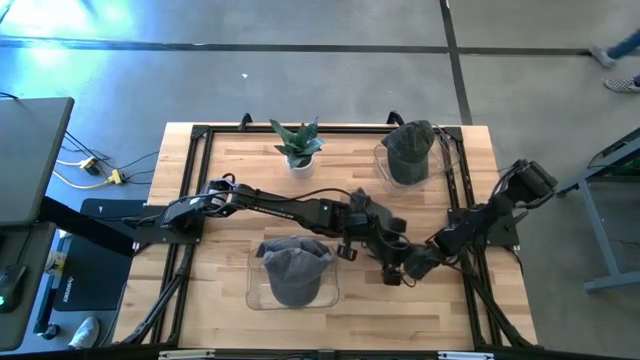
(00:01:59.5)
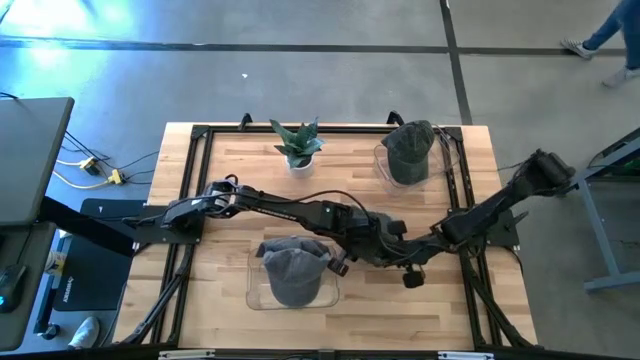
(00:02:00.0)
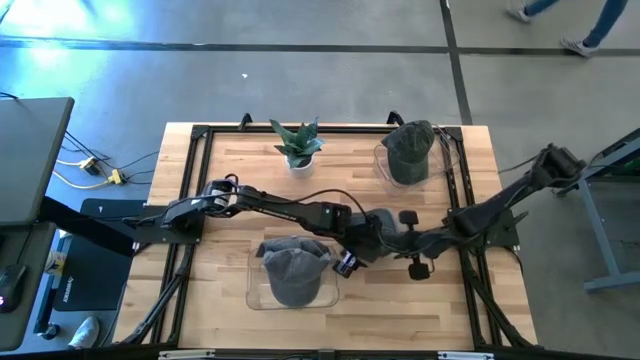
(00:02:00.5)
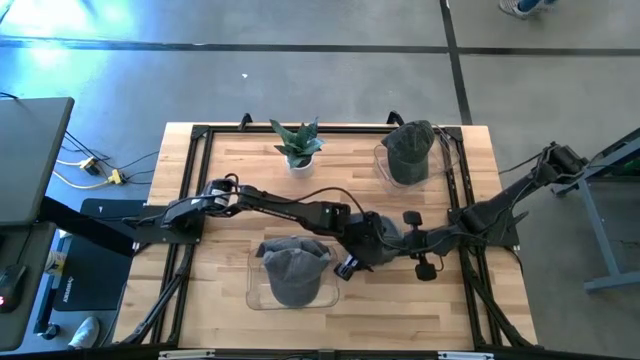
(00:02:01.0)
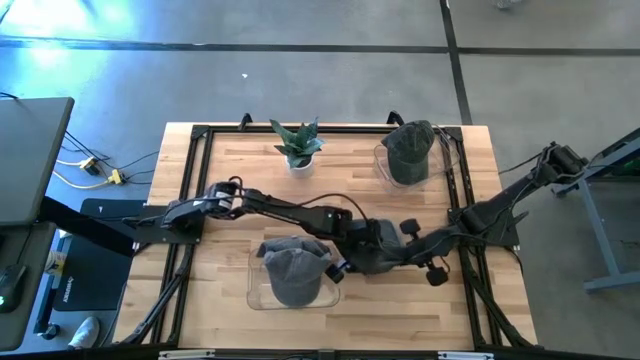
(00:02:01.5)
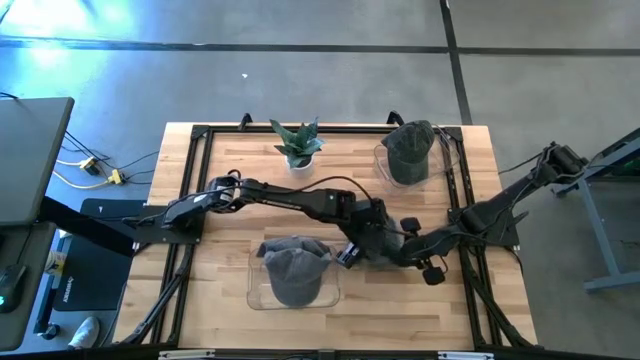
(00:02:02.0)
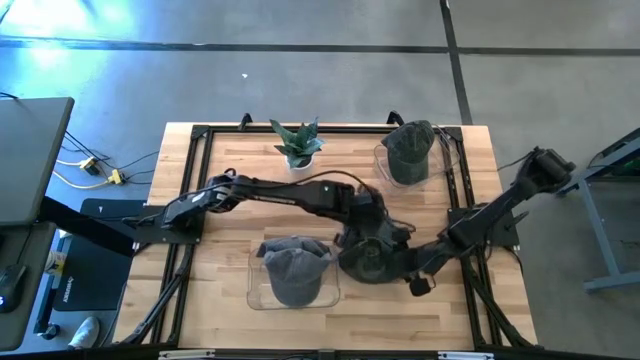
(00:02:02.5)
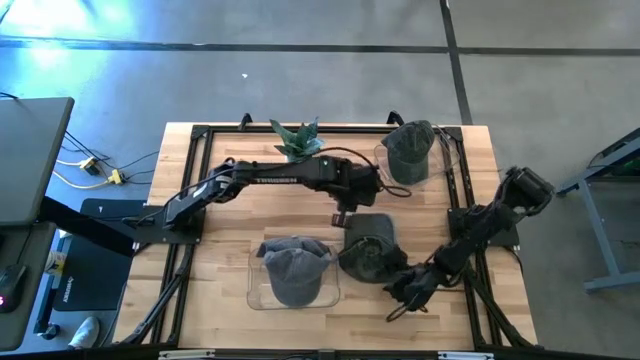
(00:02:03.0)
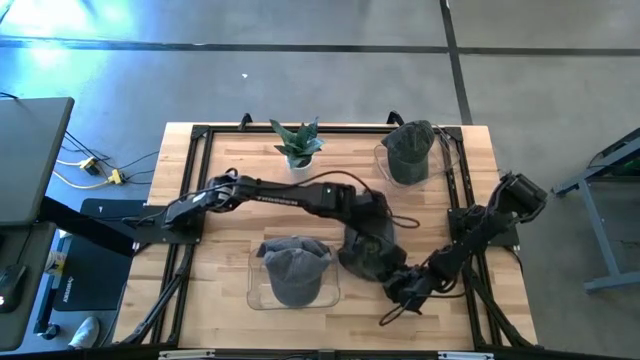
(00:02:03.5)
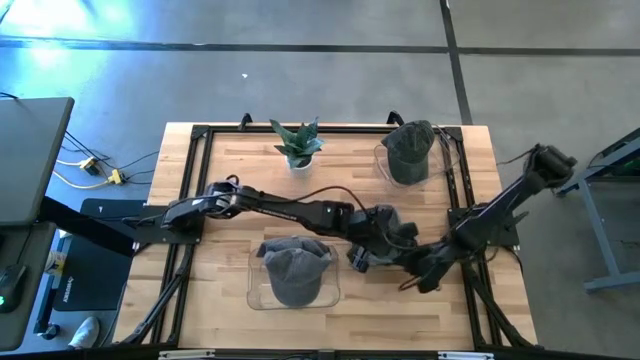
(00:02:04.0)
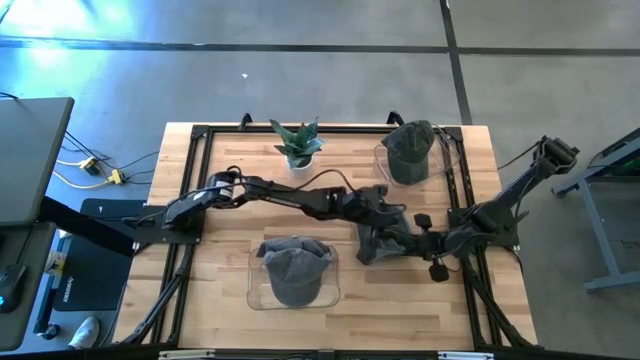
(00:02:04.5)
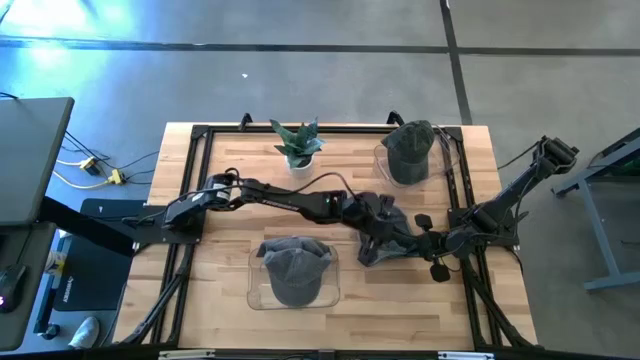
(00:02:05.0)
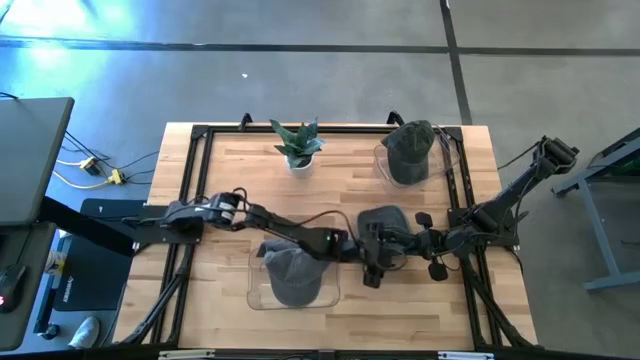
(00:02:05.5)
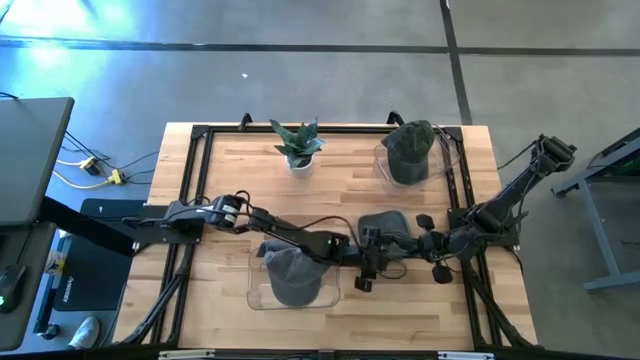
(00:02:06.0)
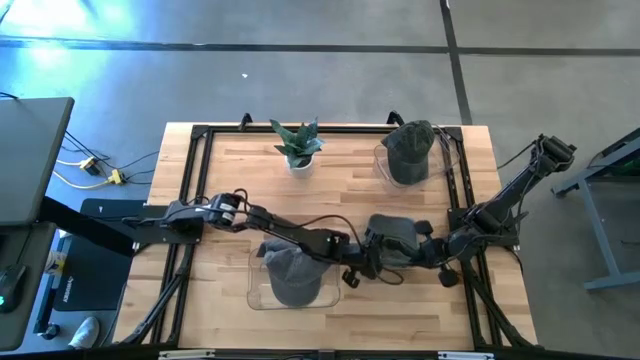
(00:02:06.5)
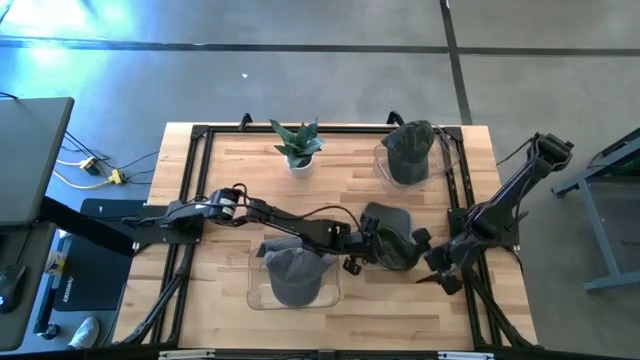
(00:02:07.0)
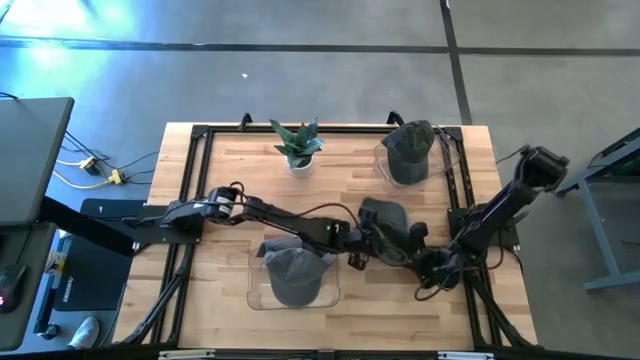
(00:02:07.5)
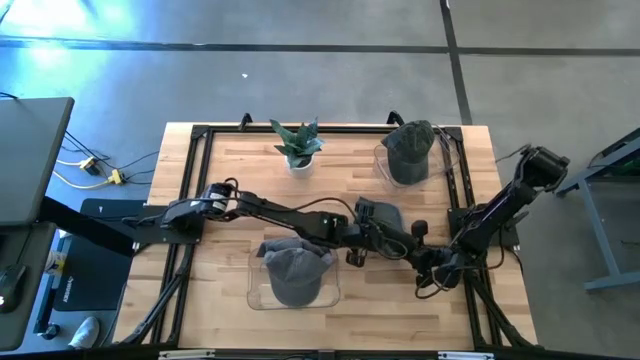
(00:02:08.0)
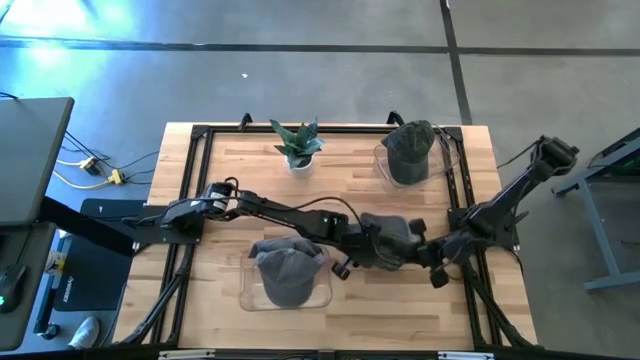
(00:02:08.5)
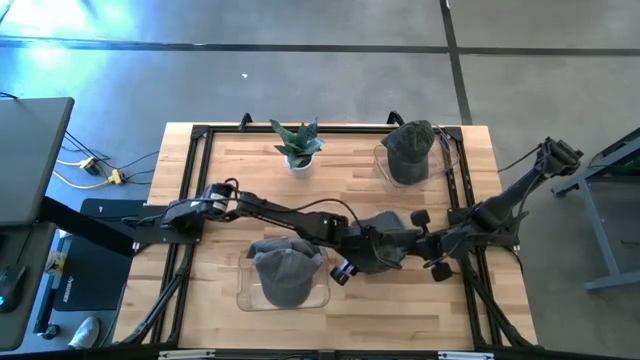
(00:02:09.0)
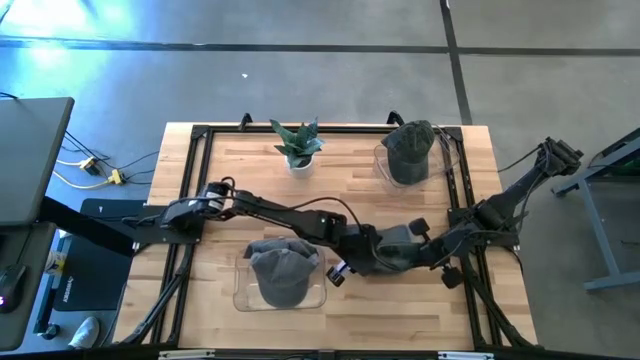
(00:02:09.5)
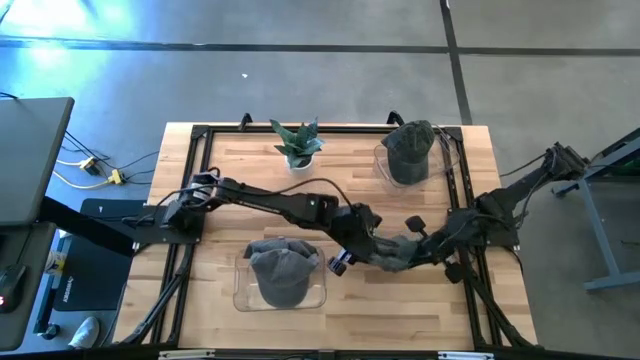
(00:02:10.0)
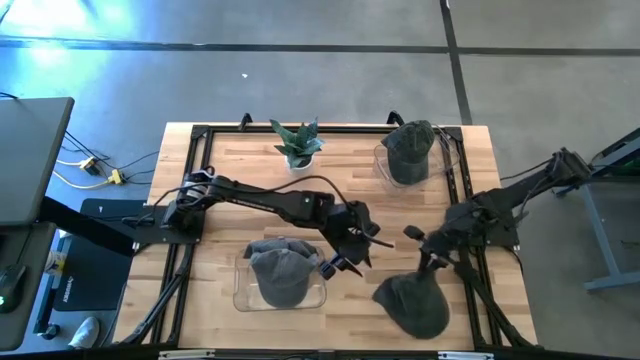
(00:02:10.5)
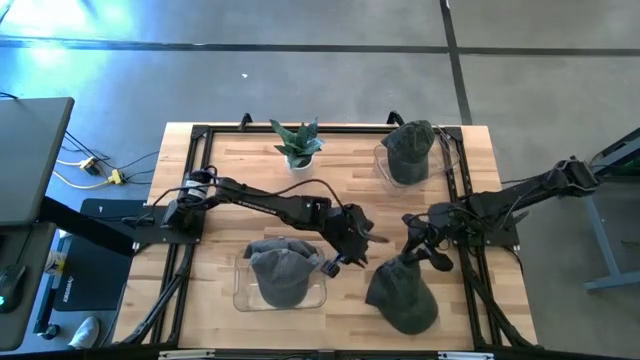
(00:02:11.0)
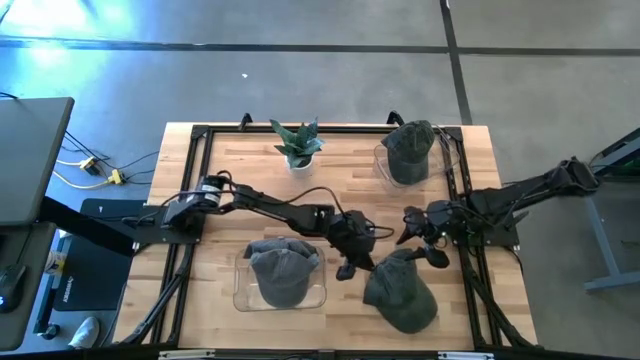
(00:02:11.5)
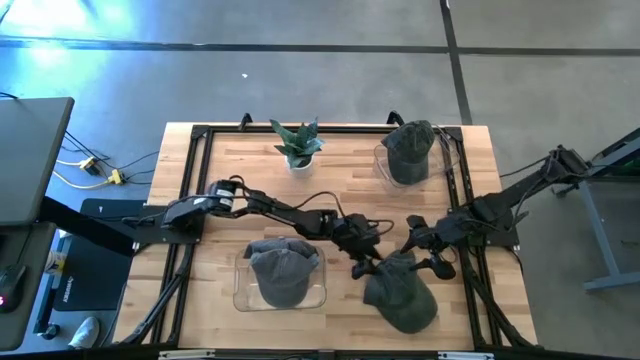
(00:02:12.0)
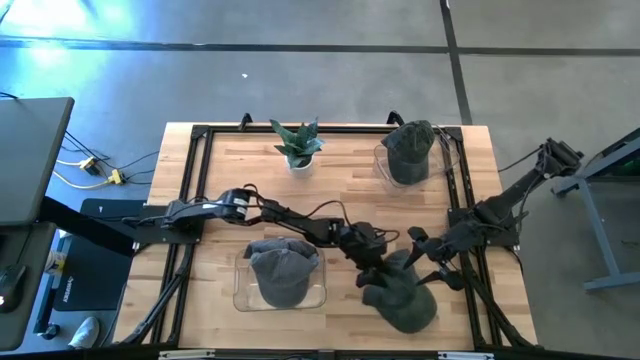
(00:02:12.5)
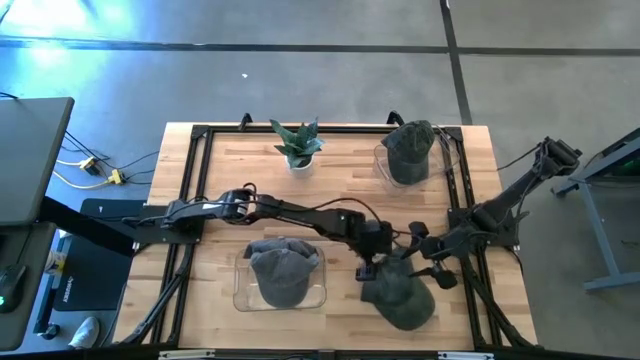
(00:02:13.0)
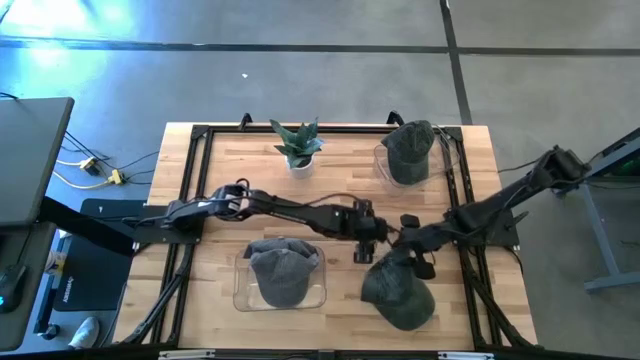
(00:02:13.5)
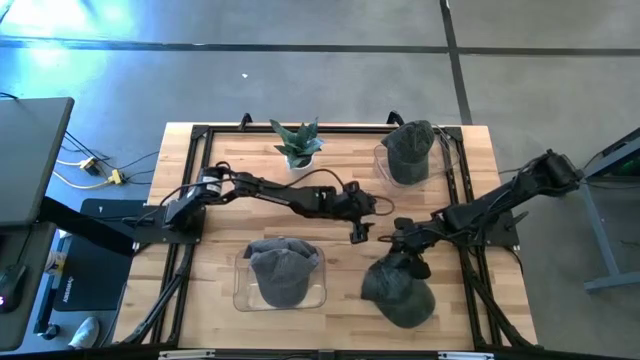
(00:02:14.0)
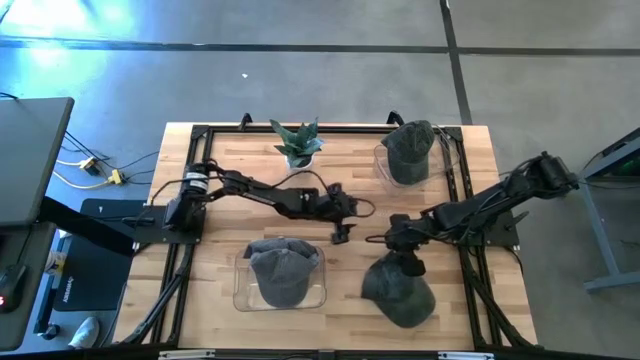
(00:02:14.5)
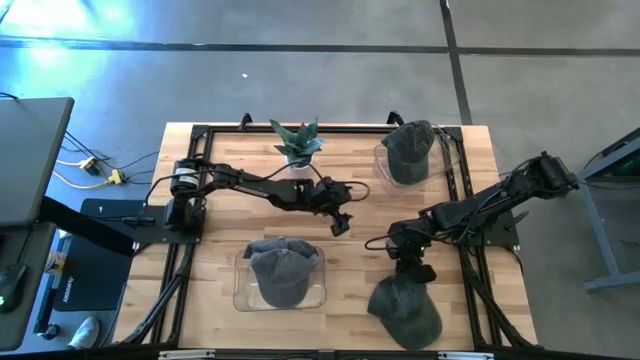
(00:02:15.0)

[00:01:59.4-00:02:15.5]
Task: Pick & Place hat
Put the dark green cap into the top transparent bin
